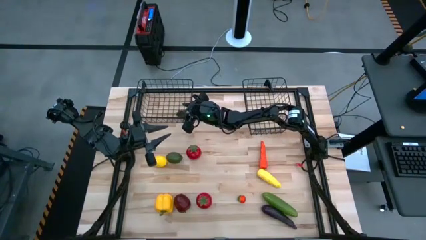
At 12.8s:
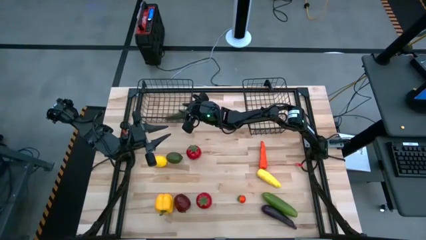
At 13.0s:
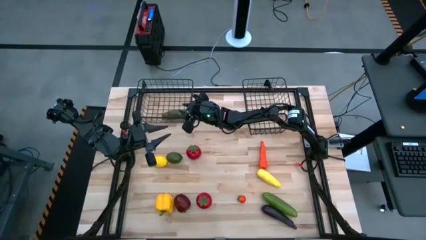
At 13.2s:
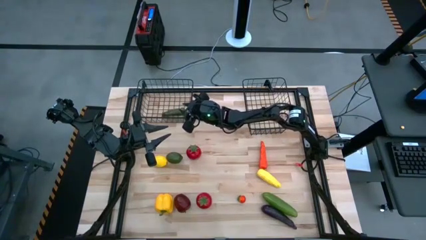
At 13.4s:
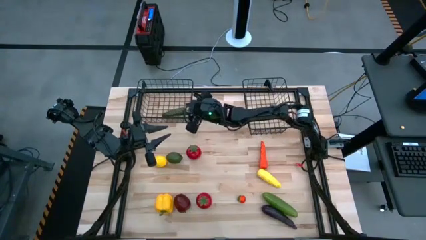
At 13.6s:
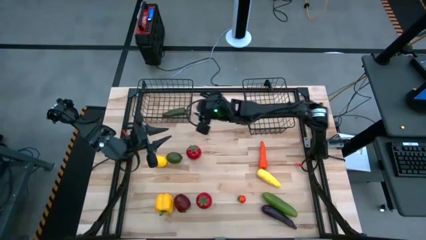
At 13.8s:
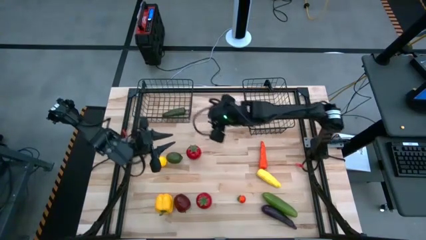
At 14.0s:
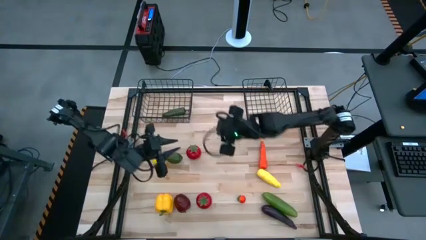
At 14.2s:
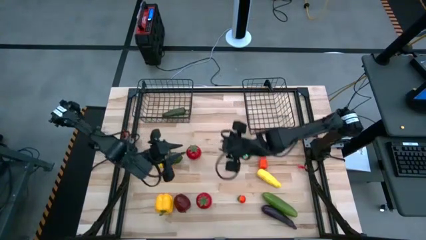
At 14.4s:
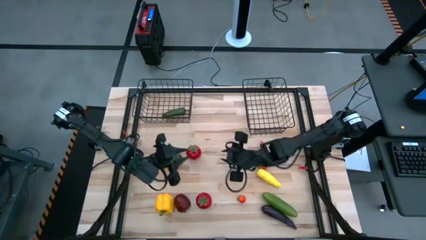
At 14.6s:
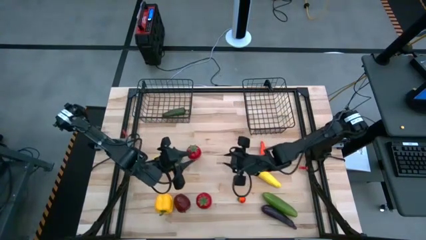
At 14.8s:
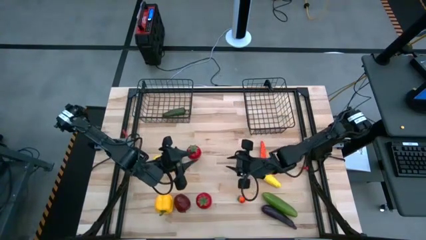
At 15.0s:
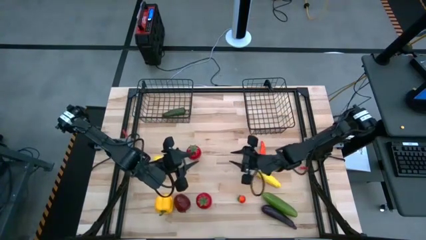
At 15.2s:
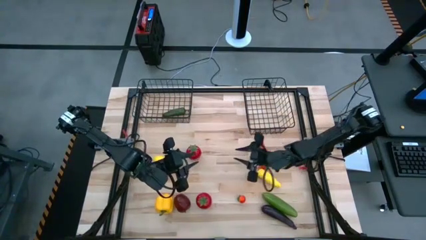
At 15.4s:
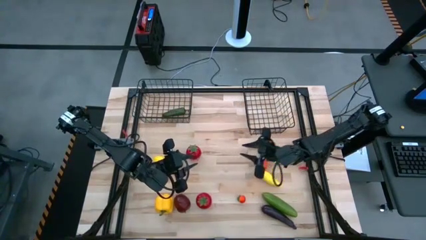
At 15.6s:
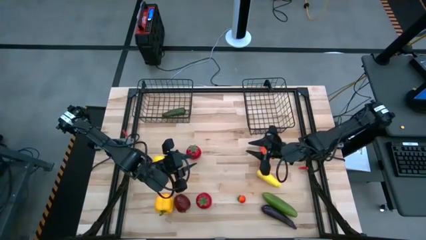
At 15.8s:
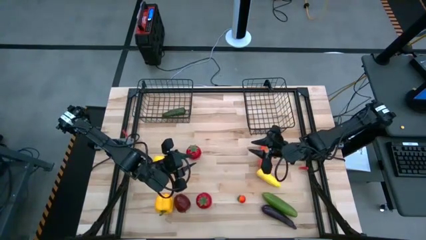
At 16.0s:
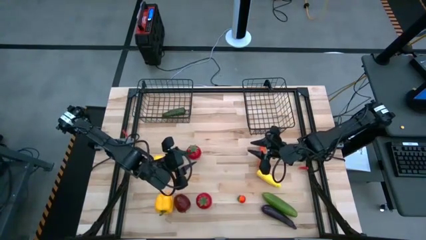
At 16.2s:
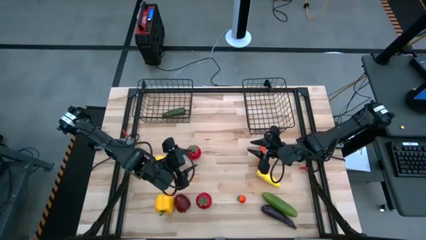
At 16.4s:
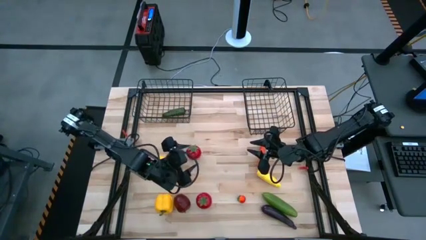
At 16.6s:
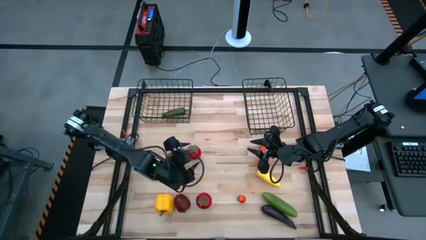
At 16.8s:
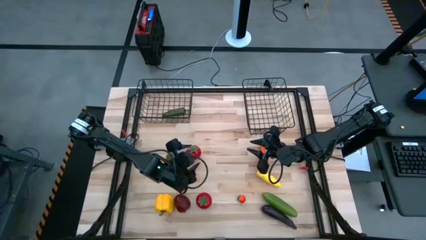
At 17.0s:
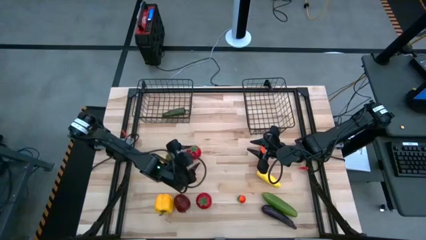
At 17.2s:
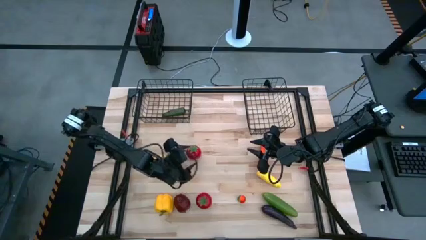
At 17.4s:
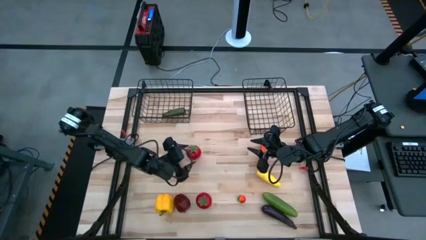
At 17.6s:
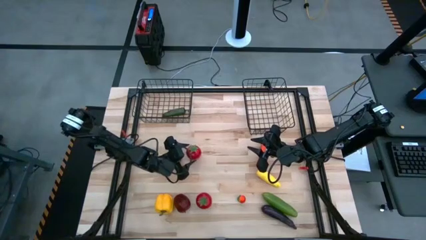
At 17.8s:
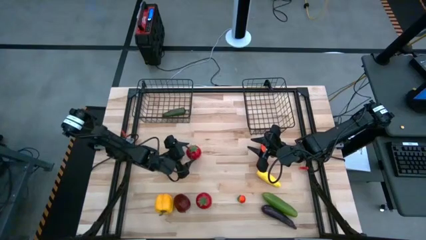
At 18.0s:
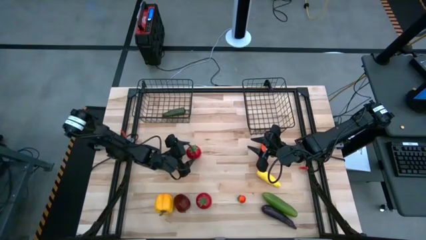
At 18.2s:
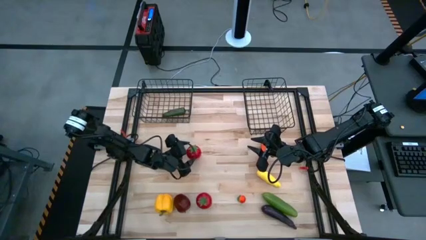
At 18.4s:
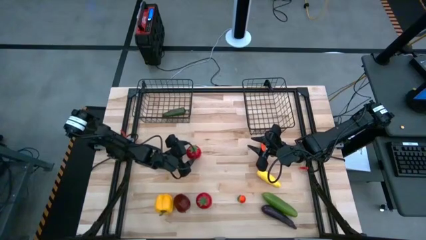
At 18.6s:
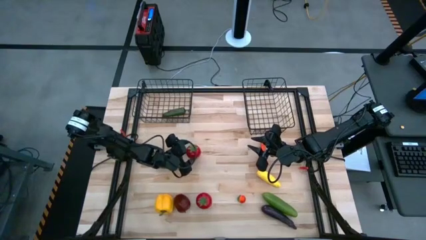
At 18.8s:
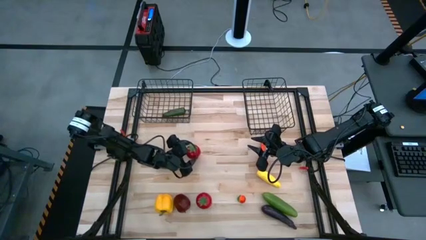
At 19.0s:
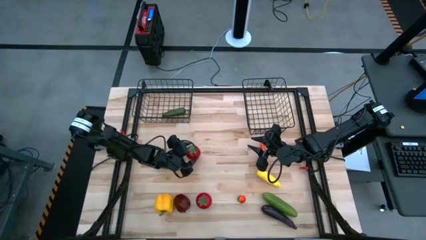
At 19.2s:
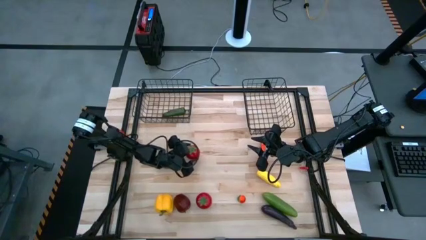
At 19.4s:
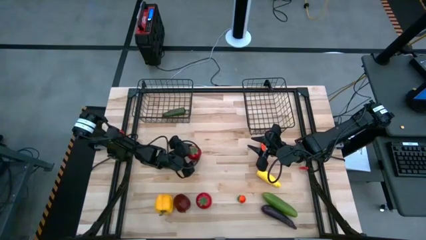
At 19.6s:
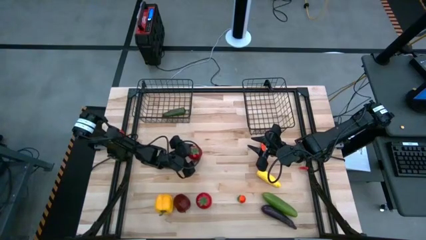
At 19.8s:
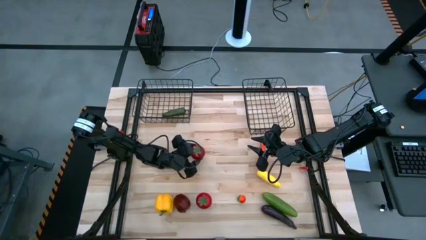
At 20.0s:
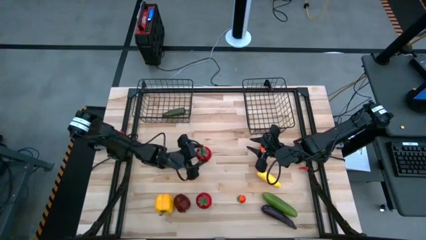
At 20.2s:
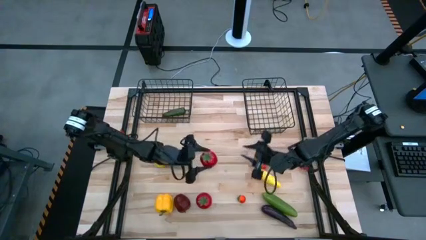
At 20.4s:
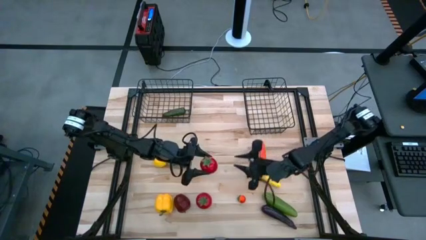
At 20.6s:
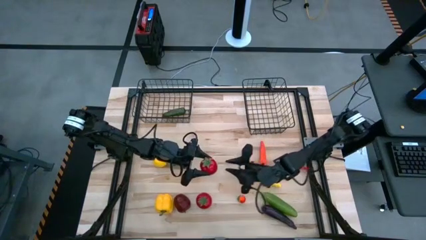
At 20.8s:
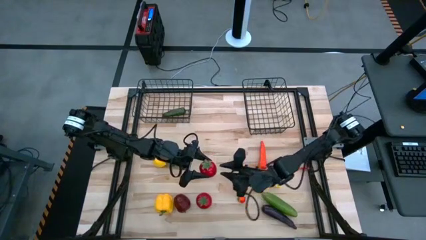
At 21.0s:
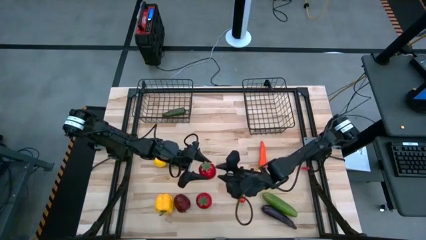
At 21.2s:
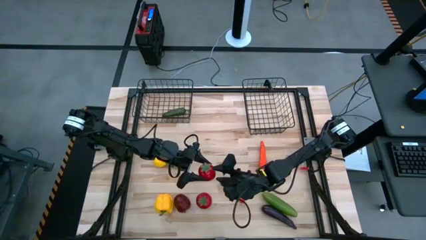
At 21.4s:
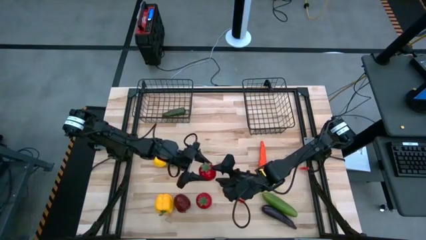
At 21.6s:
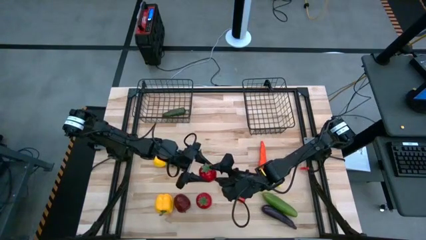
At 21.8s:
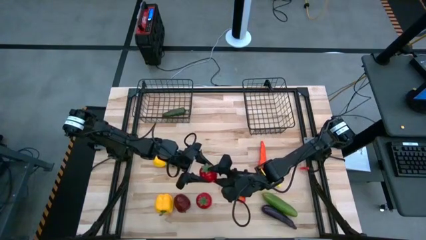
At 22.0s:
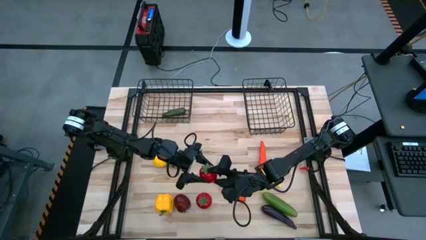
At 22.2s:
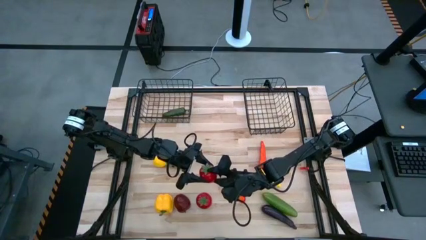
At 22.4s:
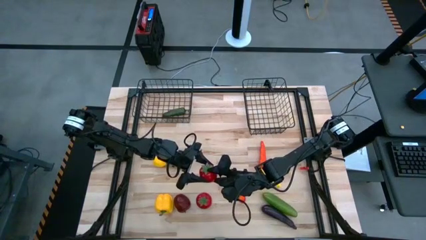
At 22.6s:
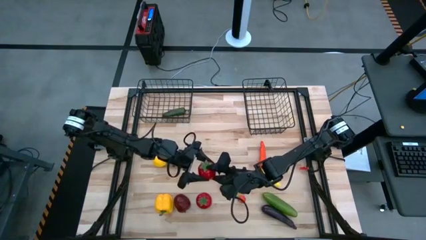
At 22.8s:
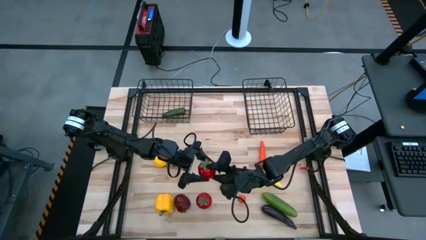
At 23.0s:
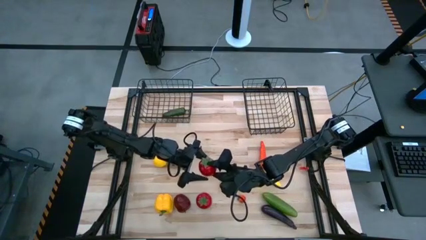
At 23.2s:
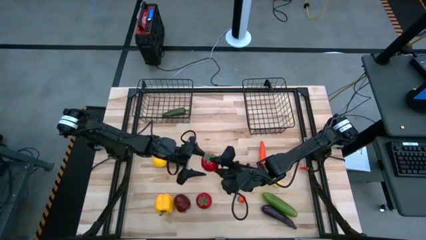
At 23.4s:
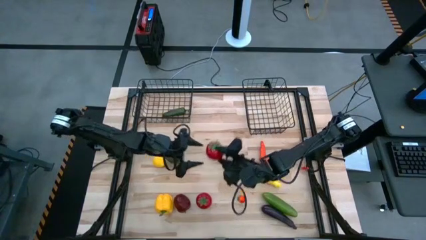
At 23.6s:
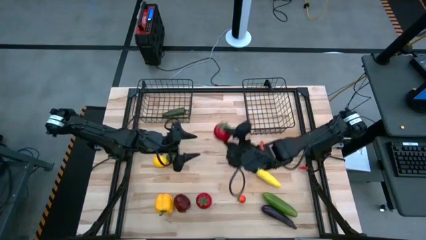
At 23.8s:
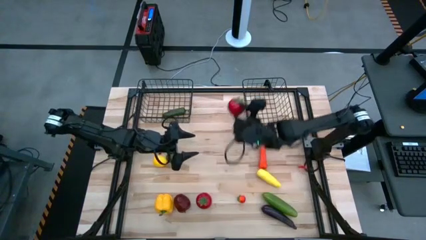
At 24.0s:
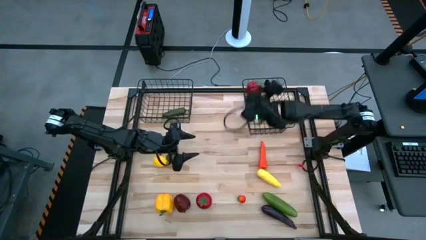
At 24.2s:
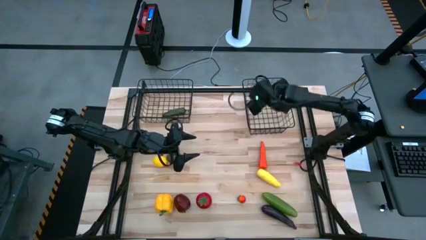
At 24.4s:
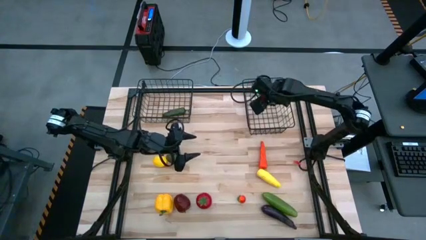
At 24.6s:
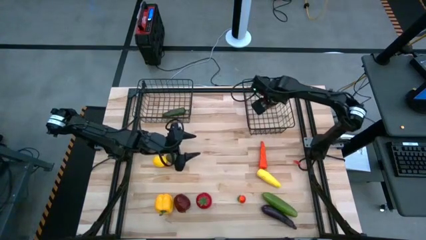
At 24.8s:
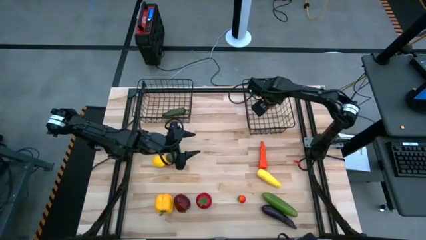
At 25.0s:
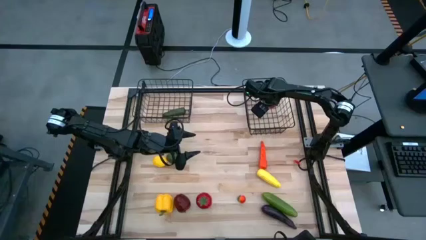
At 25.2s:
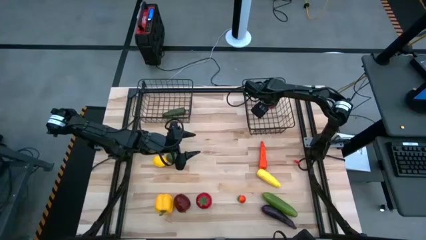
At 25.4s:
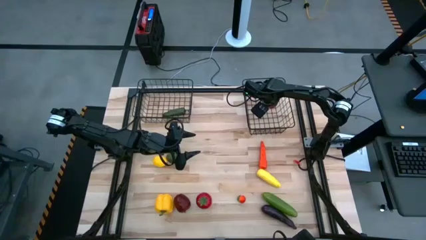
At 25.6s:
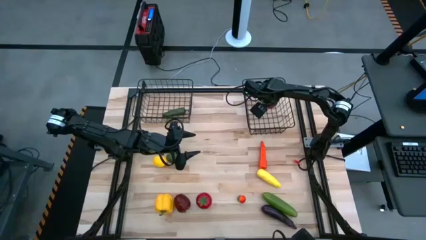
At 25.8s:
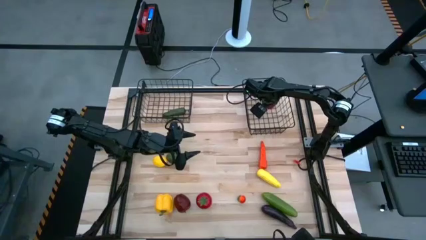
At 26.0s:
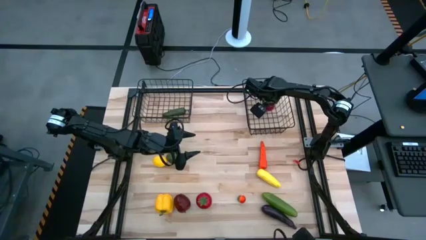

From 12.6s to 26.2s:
Task: Sort produce into baskets
Put the top red tomato into the right black wire basket
